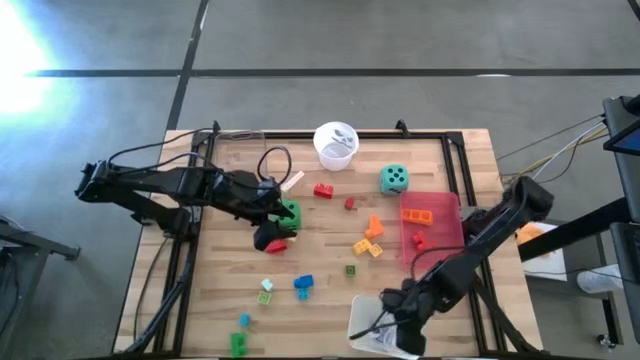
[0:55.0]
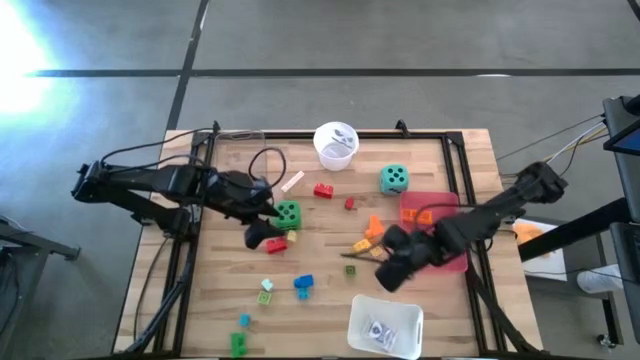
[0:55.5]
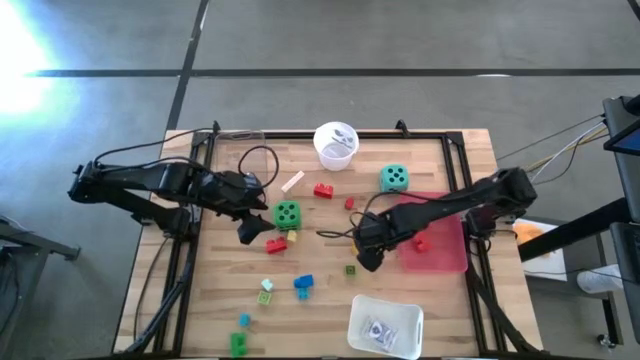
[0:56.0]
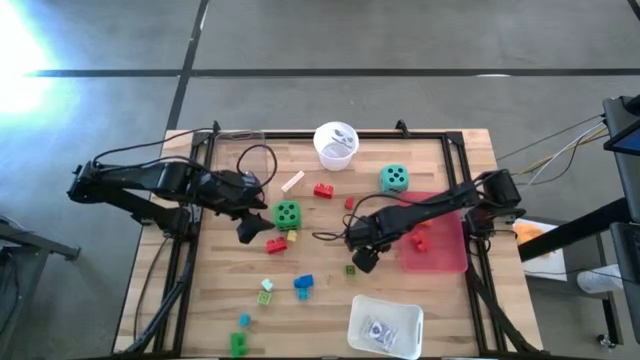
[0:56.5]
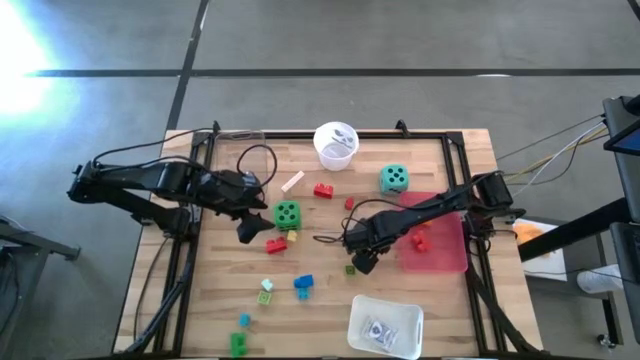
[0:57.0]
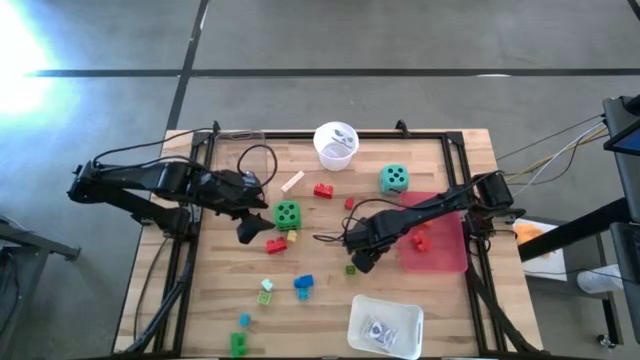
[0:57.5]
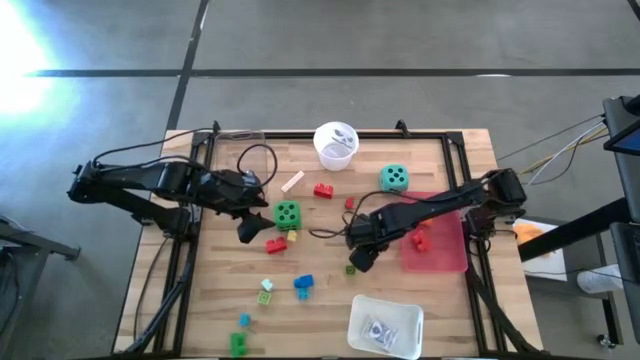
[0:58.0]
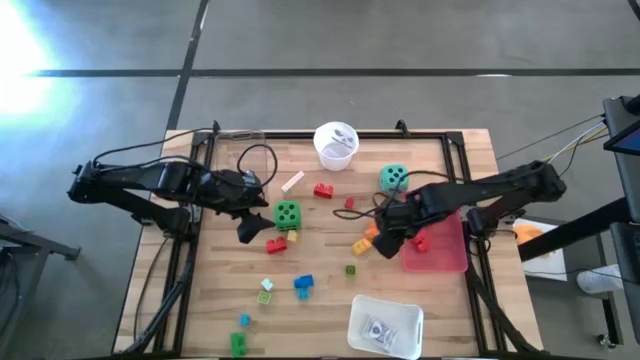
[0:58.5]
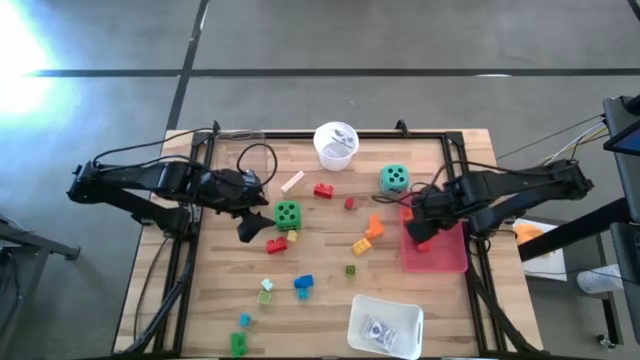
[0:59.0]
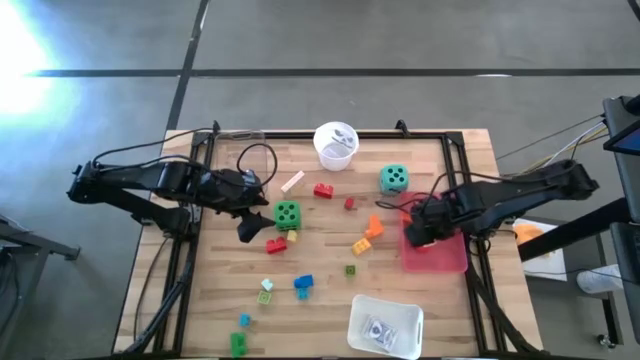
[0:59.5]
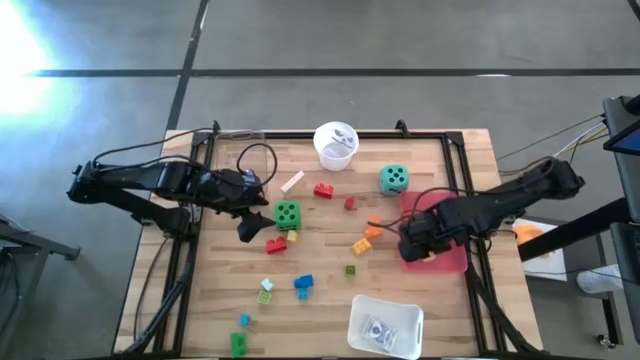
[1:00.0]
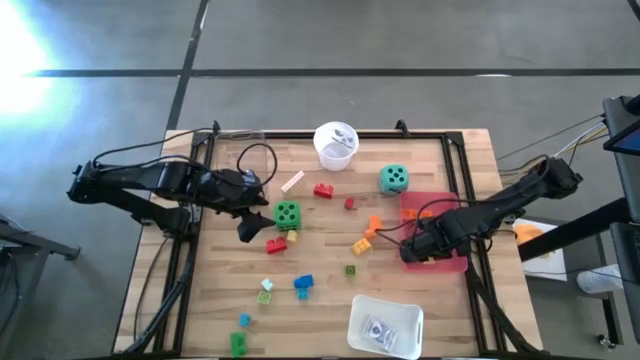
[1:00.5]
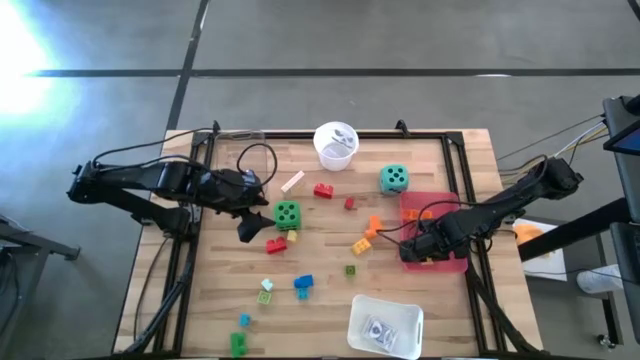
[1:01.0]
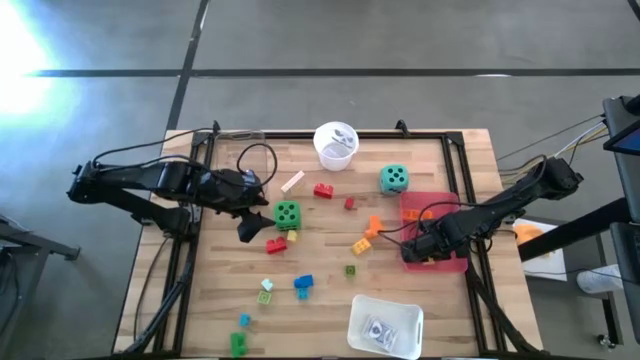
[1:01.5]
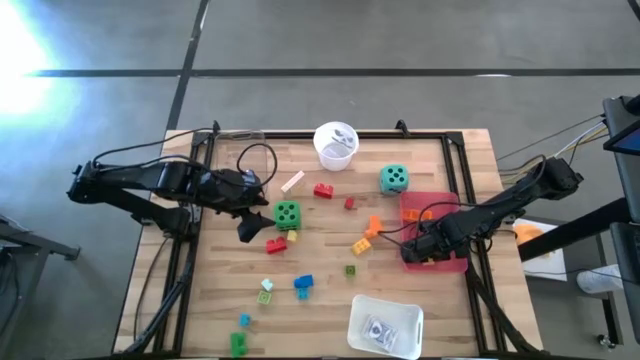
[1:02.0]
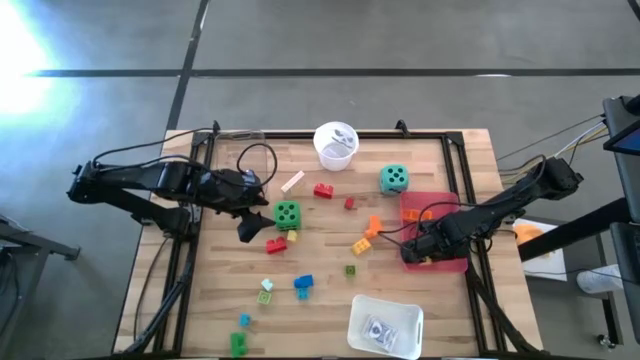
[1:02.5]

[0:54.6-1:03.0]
Task: Pick & Place Toys
Put the yellow game piece into the pink bin

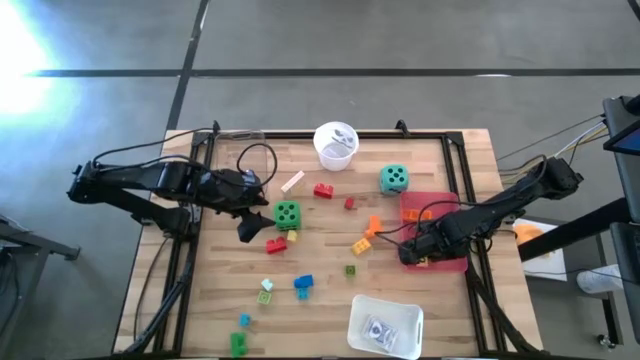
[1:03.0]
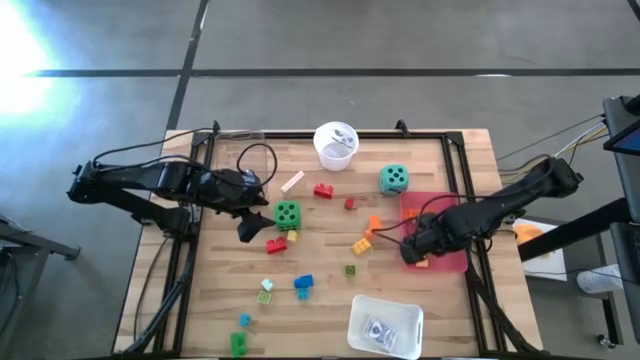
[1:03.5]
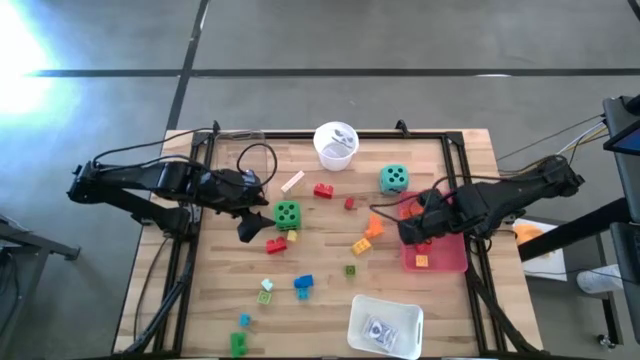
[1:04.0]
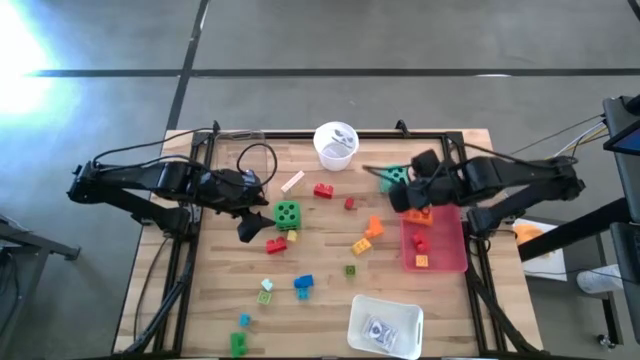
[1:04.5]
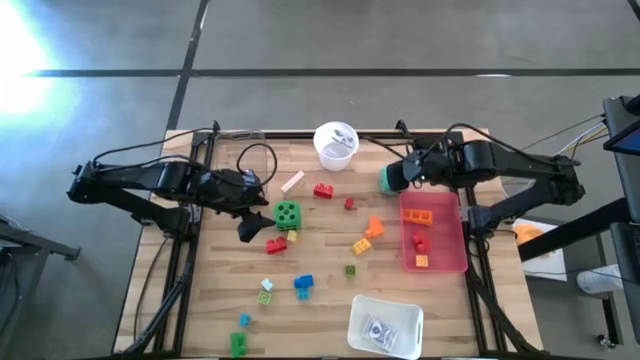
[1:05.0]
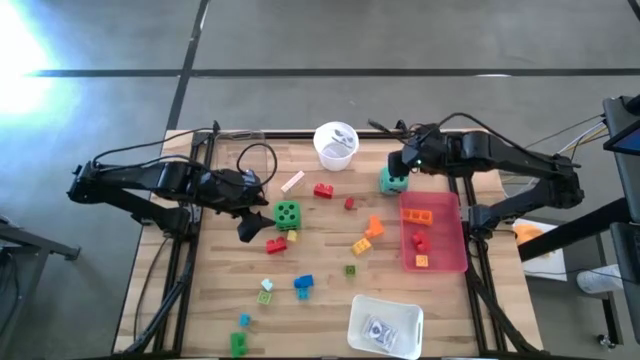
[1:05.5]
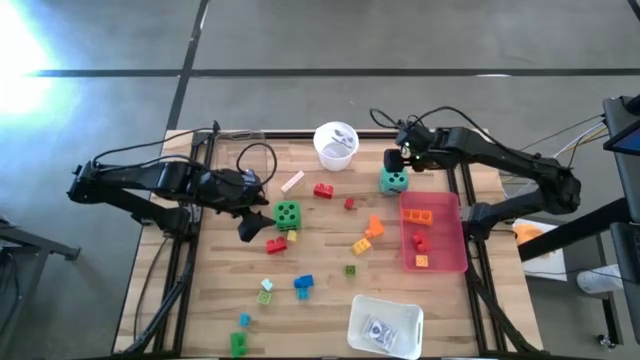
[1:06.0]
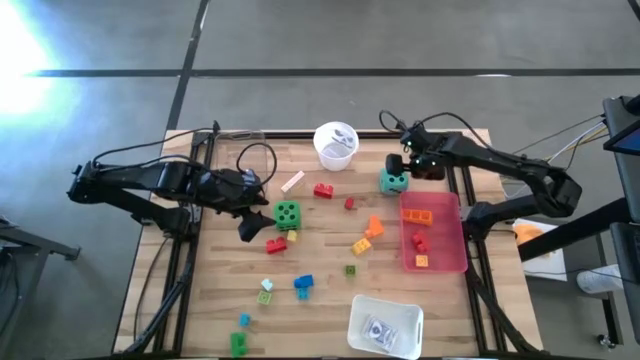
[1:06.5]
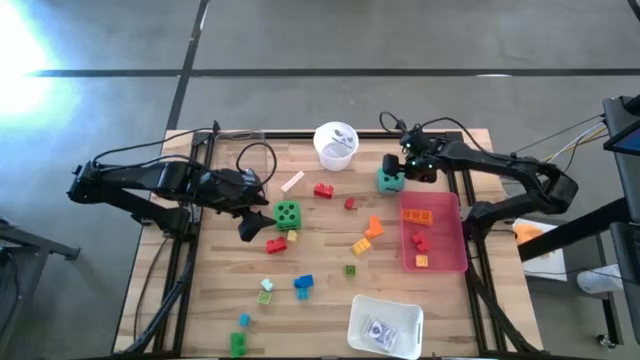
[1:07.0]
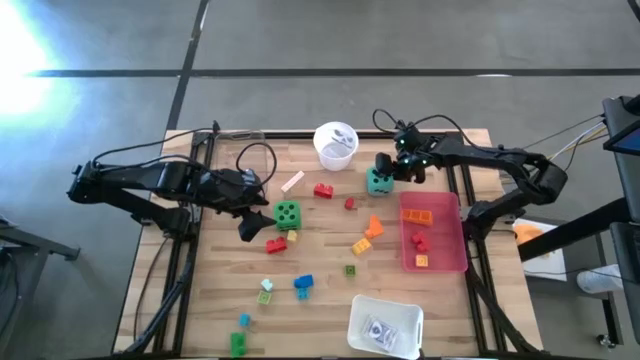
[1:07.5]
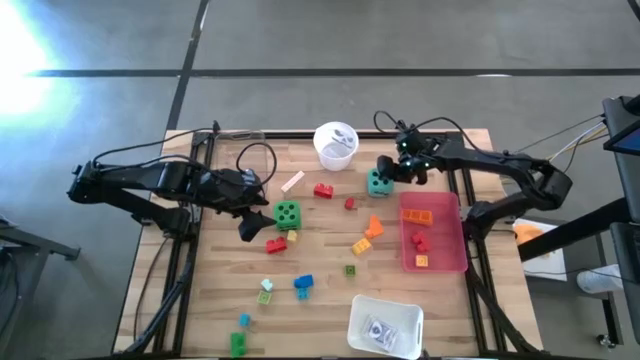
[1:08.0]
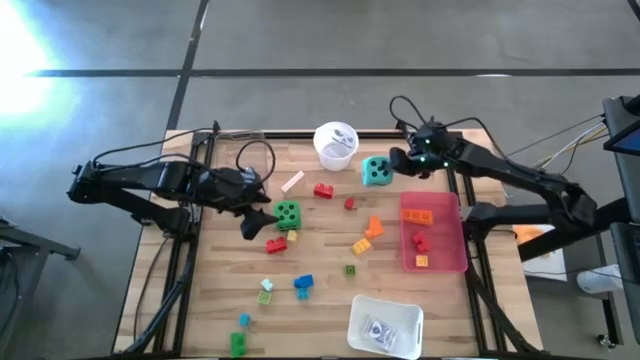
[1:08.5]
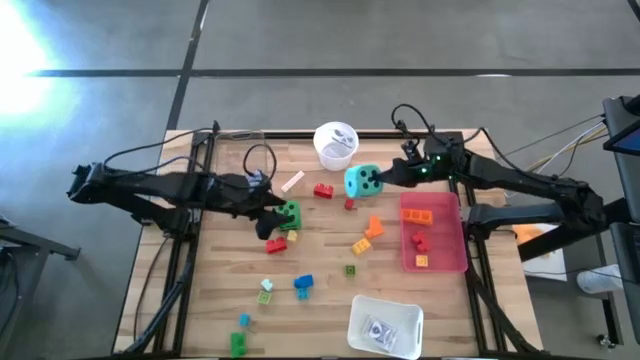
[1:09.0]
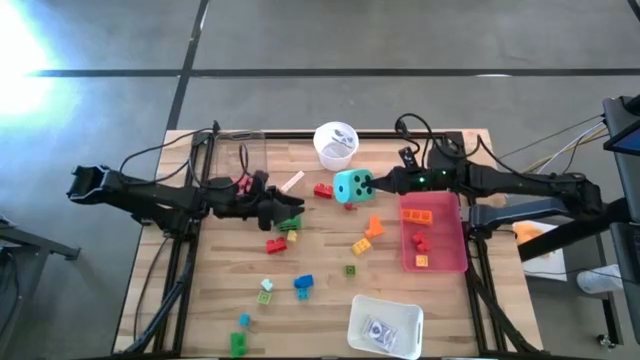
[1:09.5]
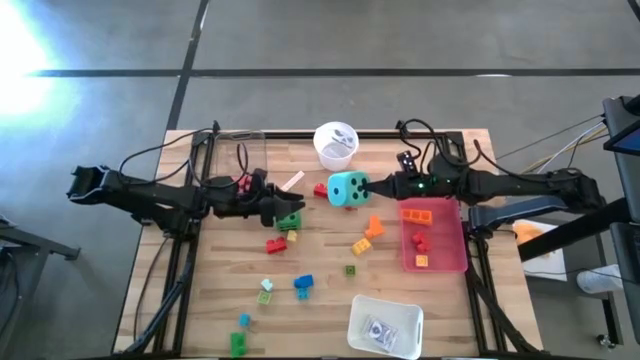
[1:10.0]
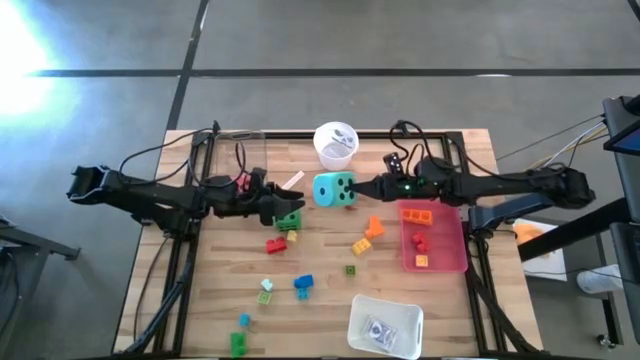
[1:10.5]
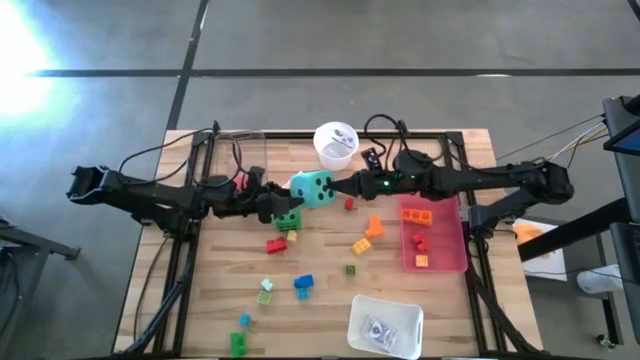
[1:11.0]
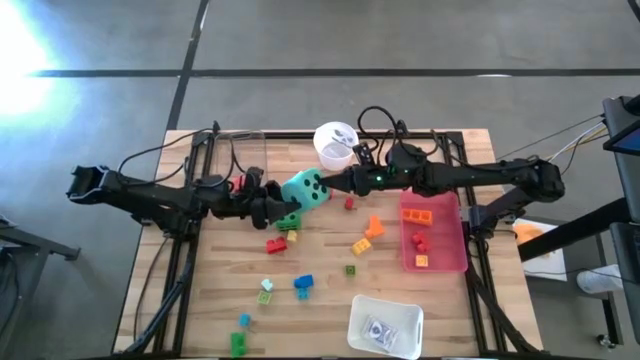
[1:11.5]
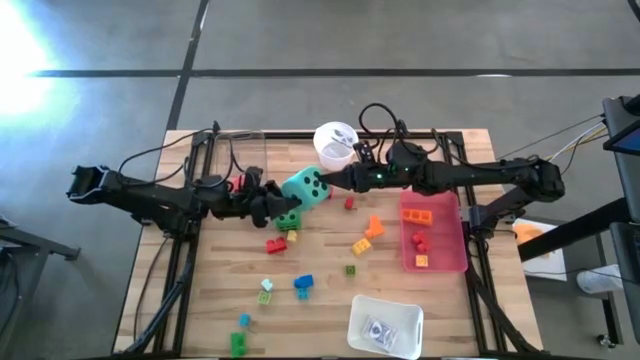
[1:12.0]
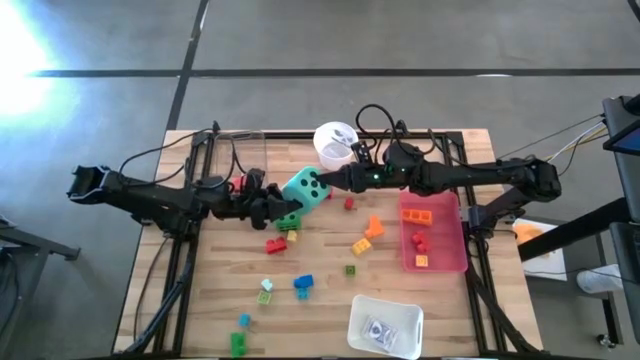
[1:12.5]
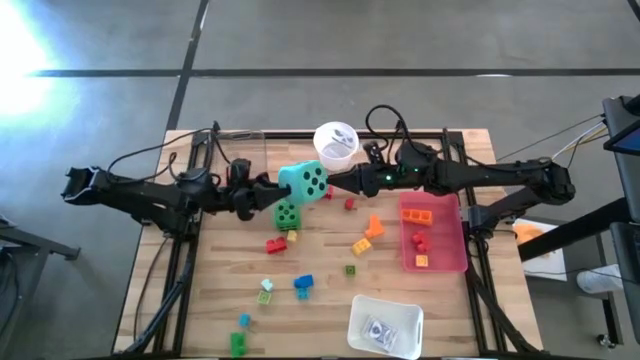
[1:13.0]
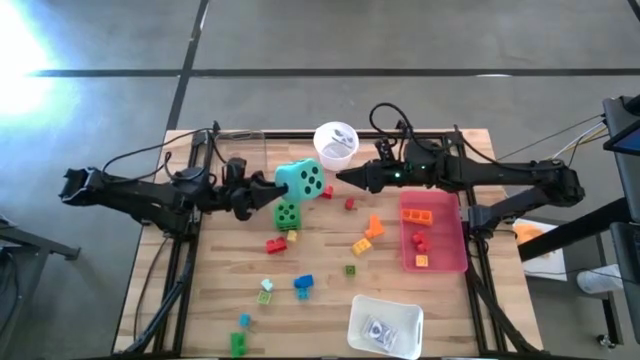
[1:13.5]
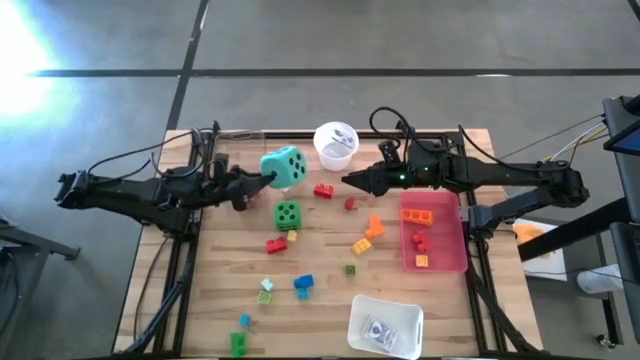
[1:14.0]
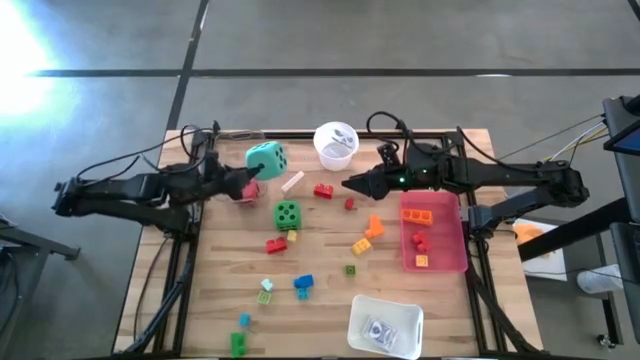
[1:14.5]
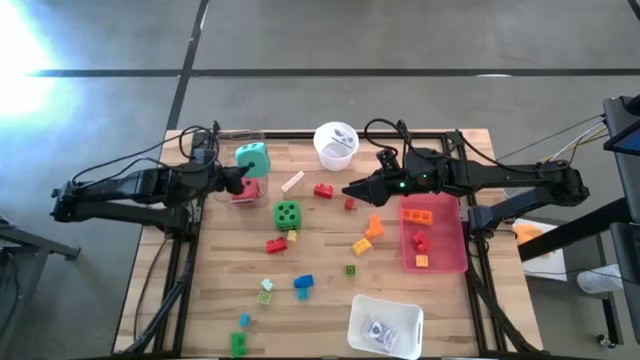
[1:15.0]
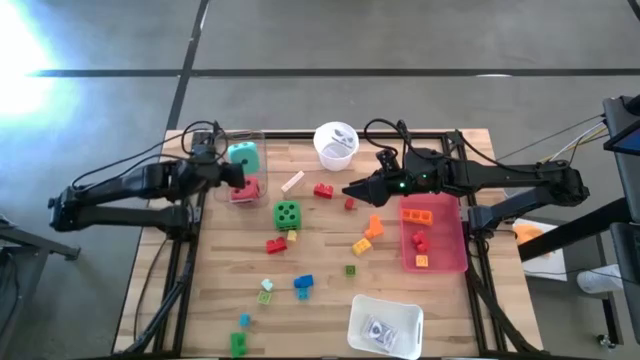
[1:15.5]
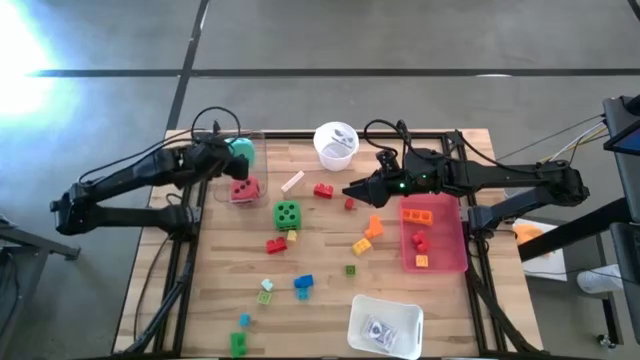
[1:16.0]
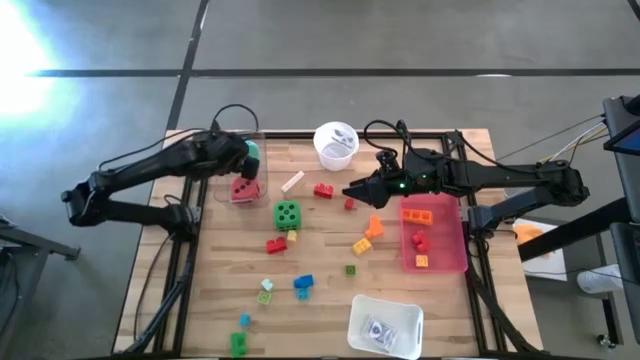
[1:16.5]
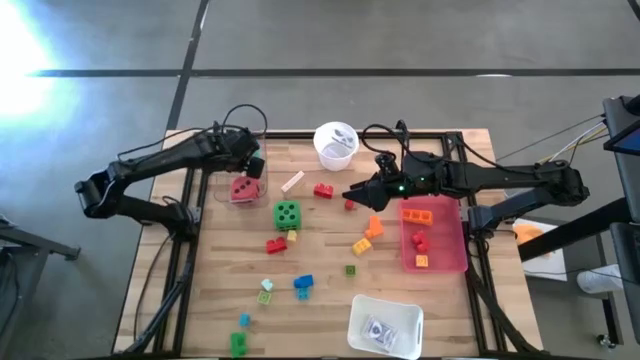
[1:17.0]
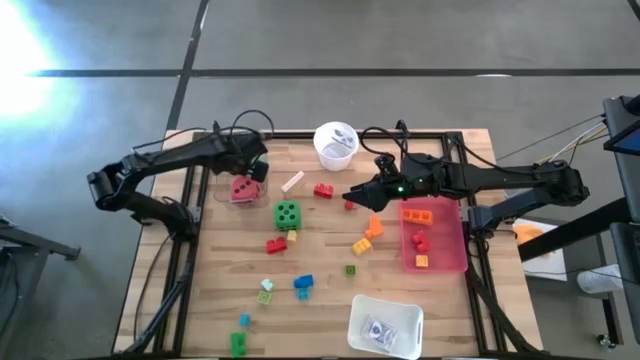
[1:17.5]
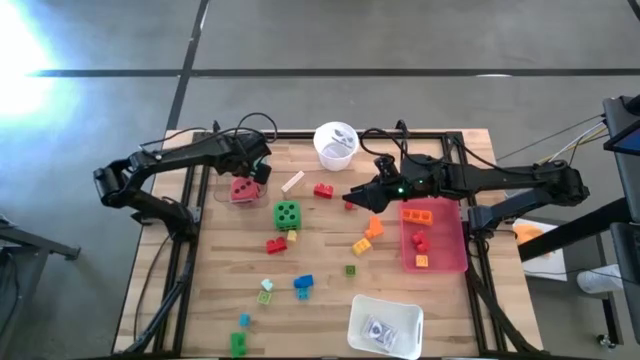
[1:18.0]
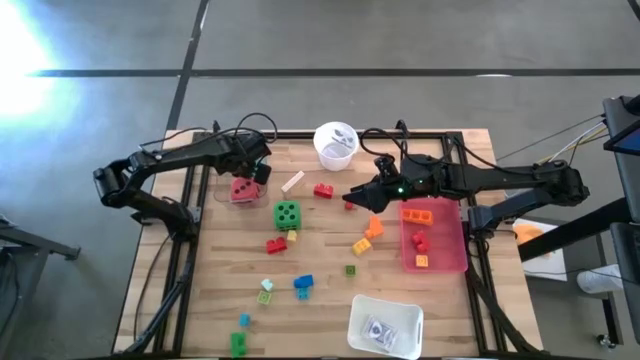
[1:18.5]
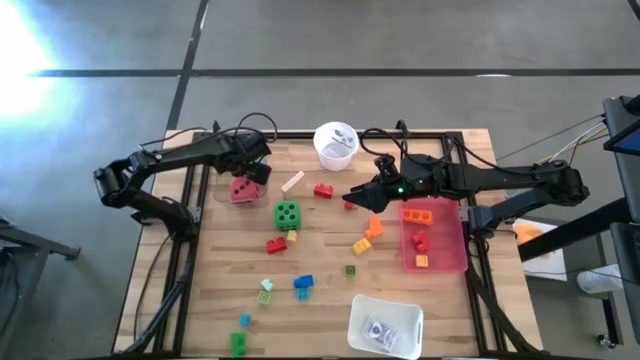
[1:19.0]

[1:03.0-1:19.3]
Put the blue dice into the transparent bin
